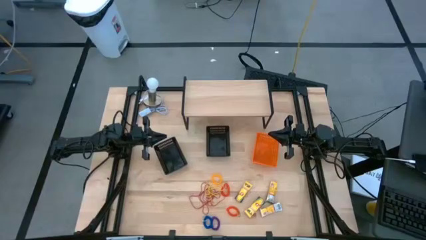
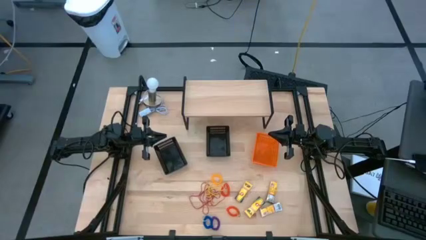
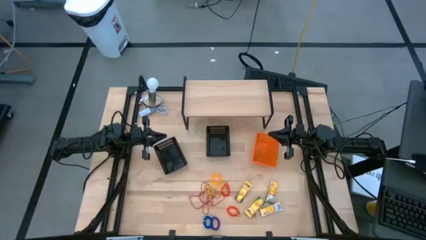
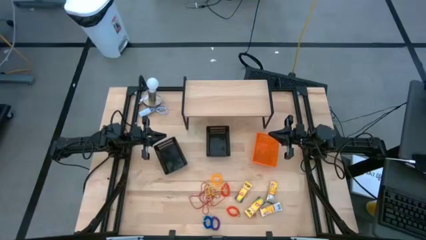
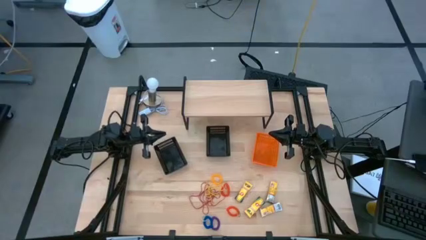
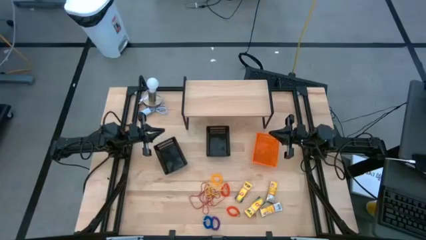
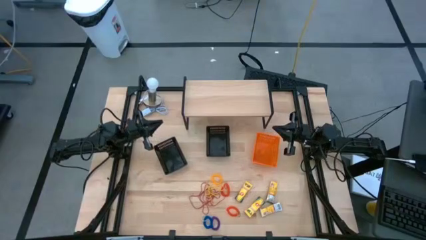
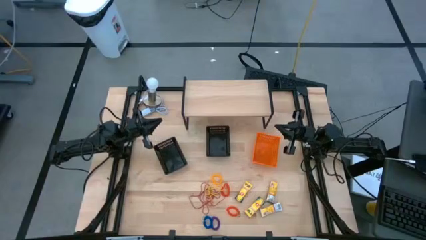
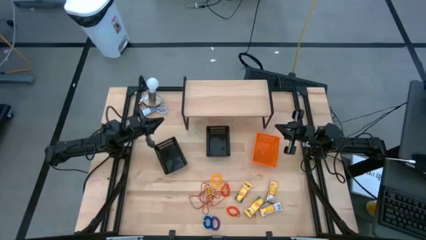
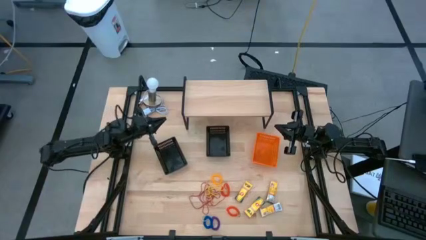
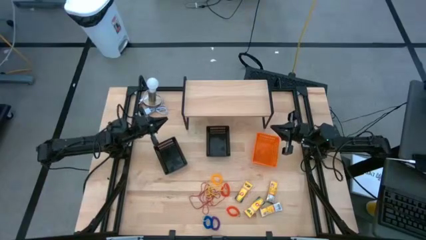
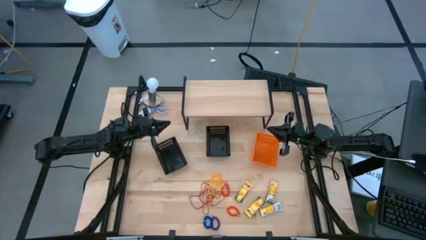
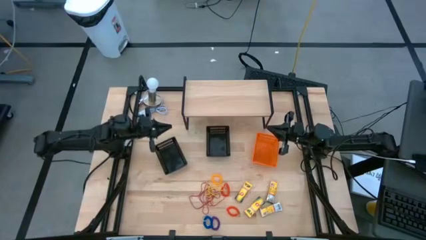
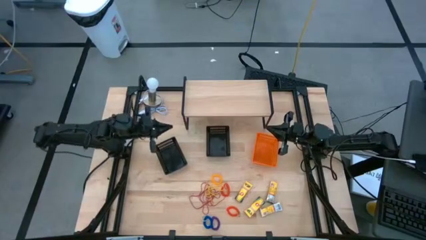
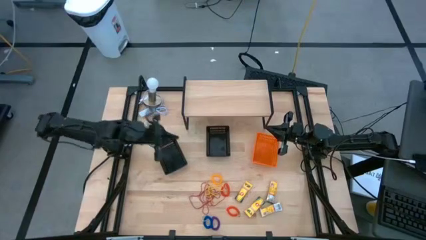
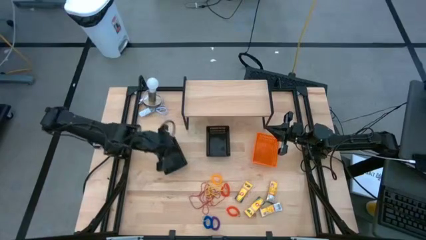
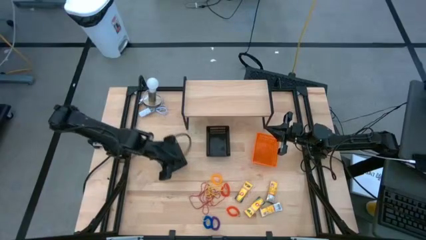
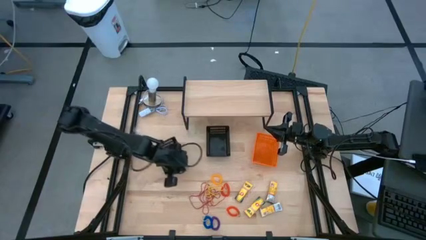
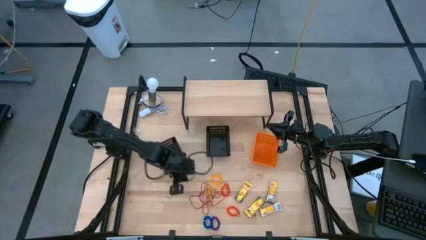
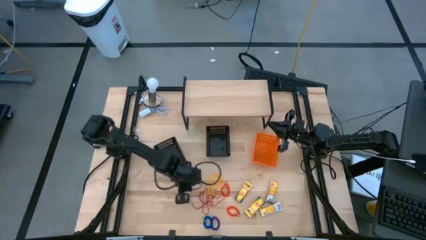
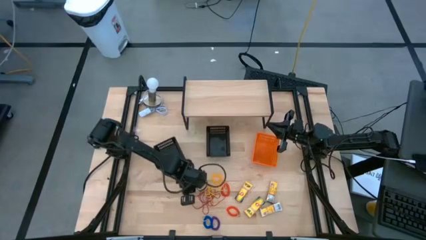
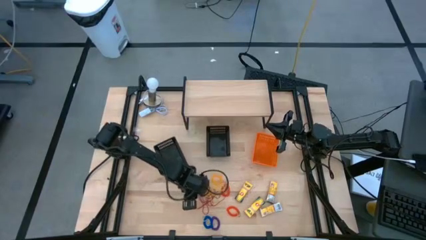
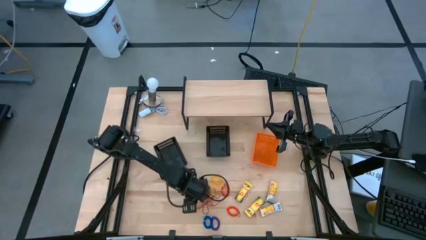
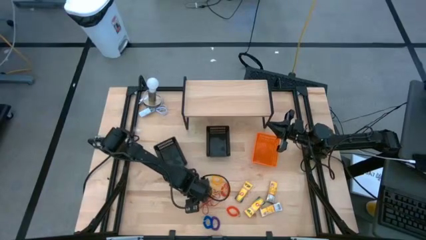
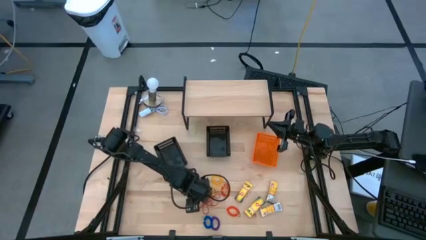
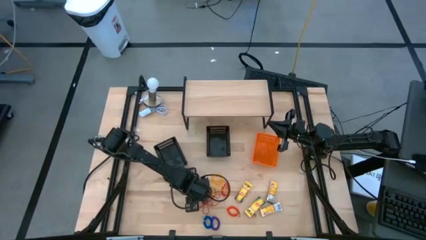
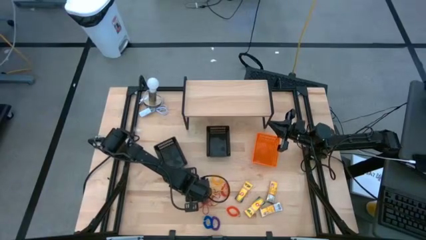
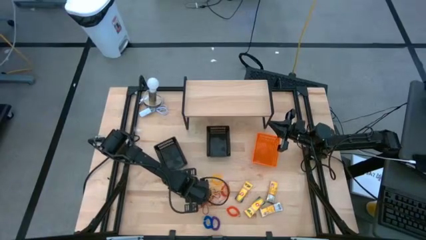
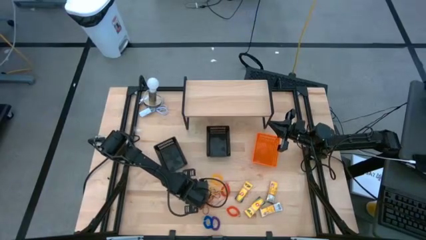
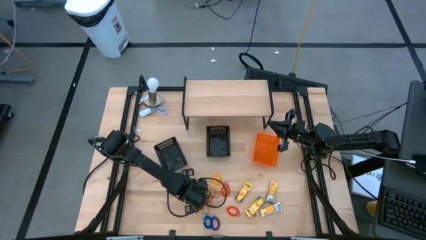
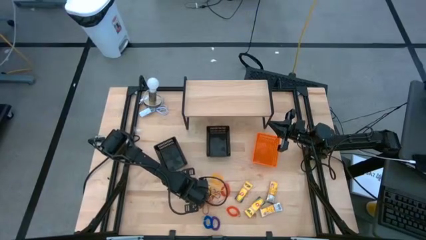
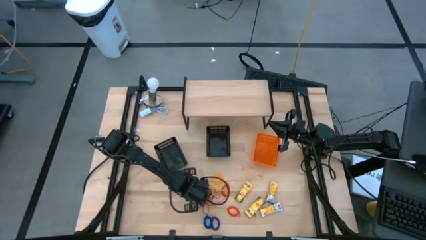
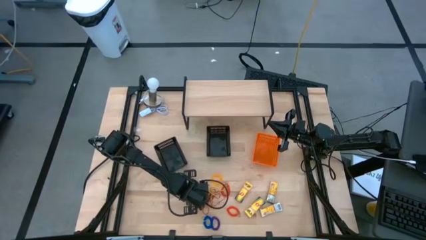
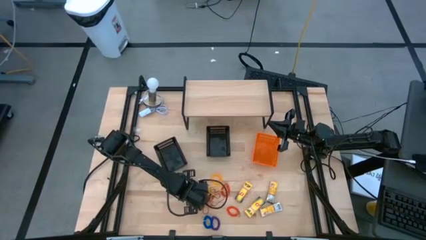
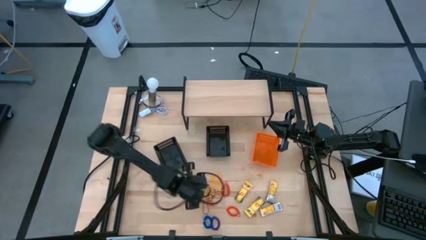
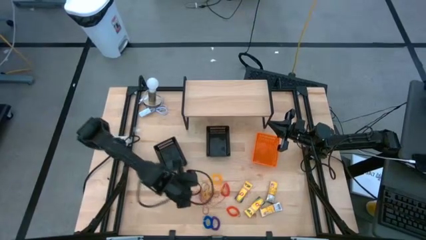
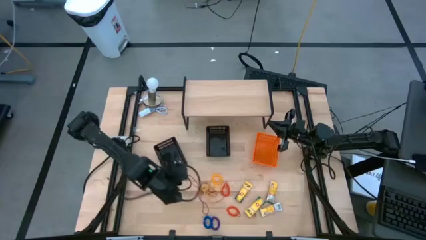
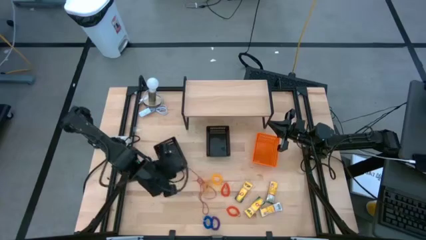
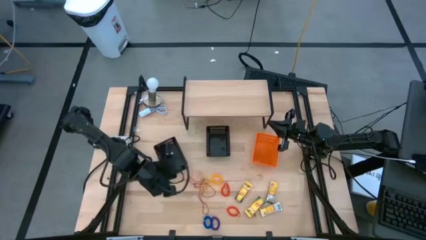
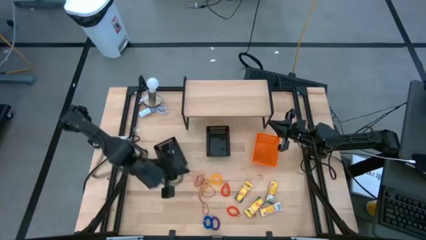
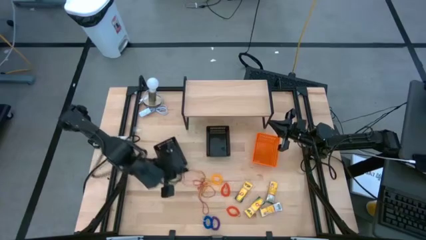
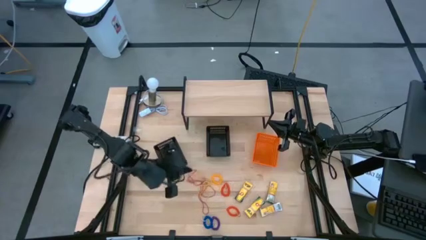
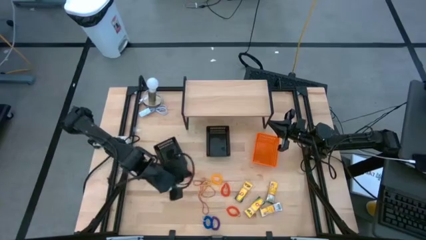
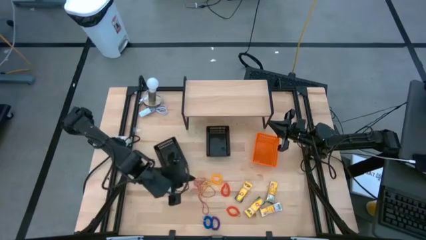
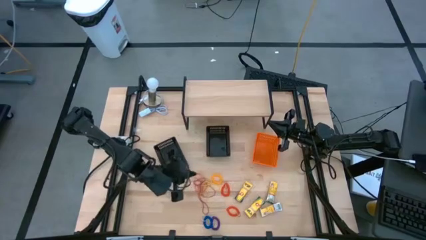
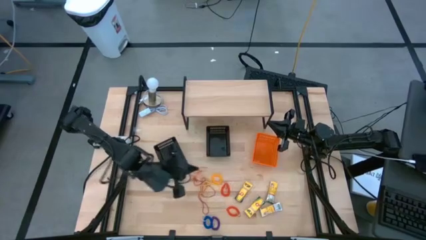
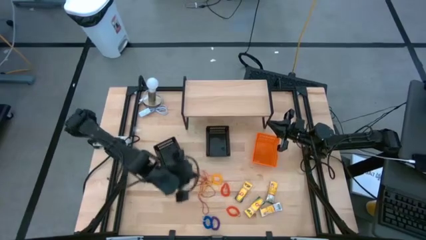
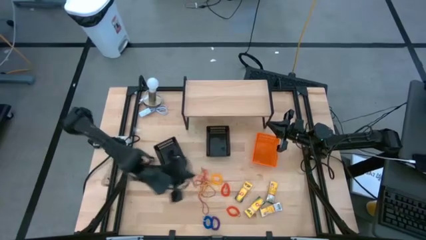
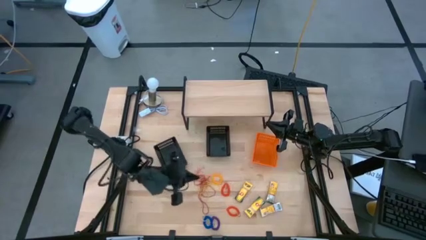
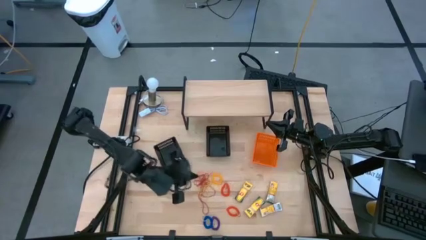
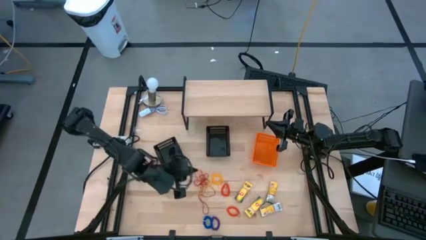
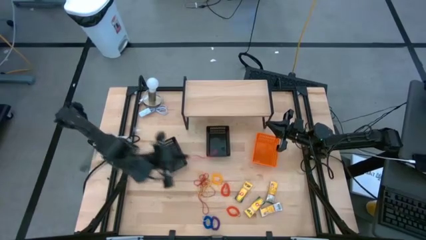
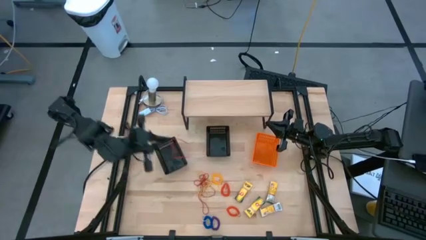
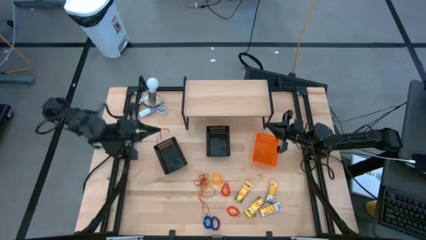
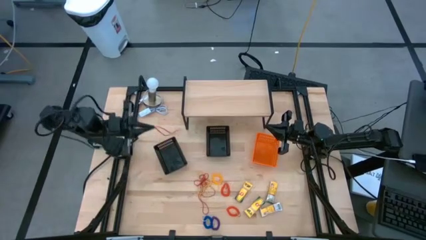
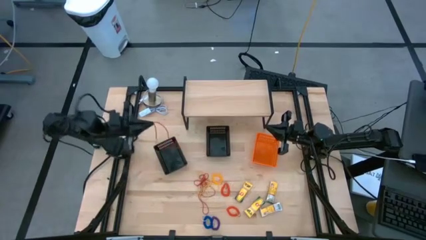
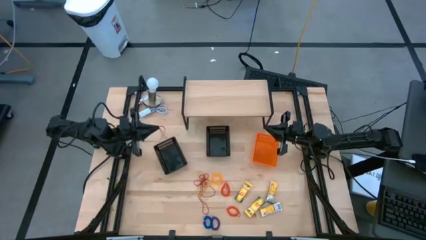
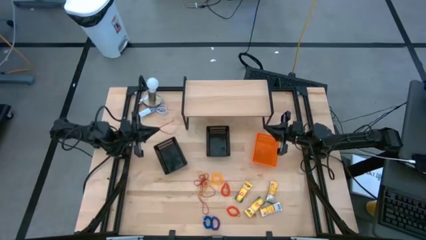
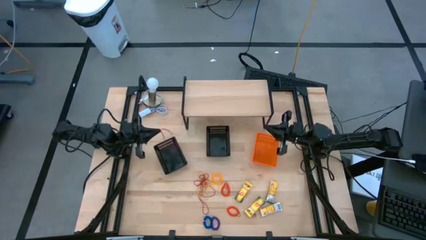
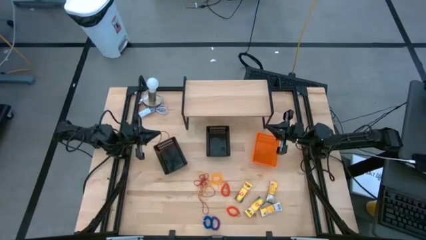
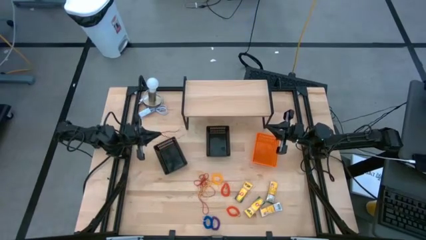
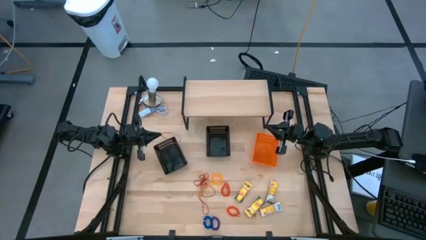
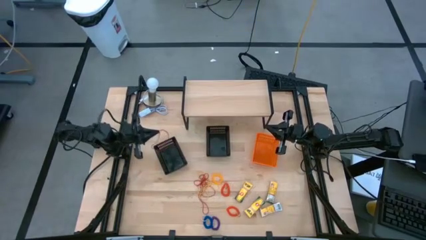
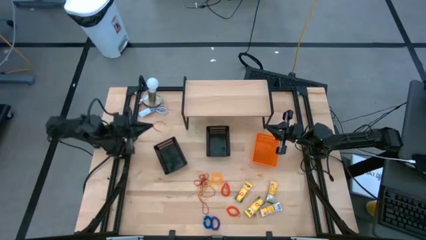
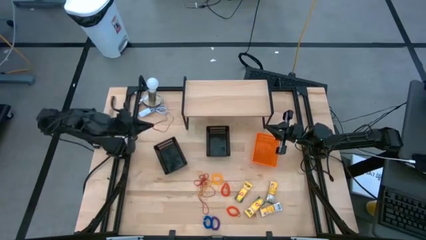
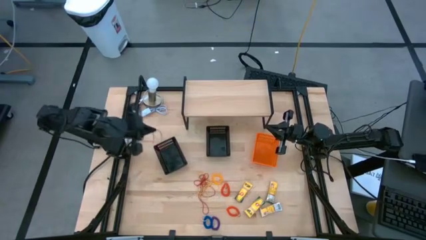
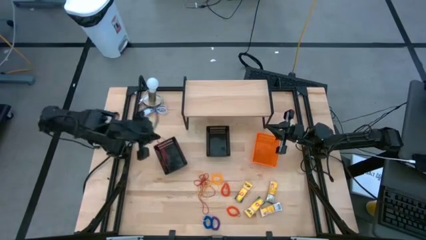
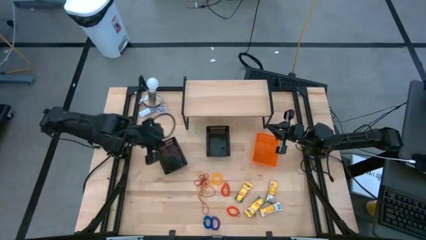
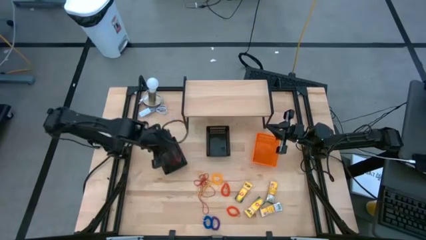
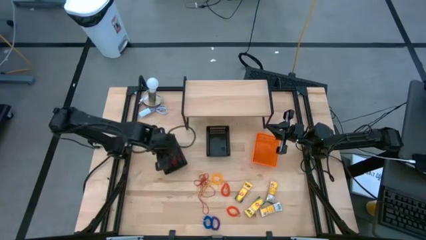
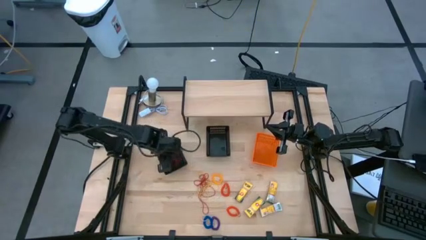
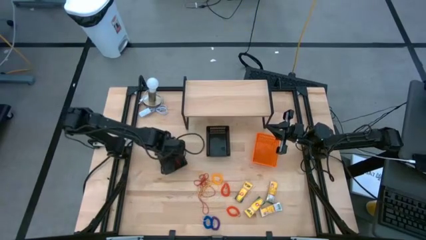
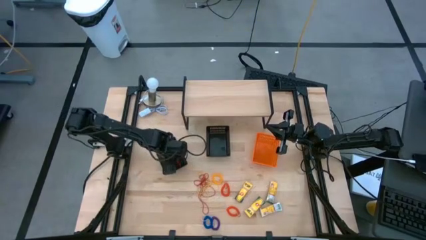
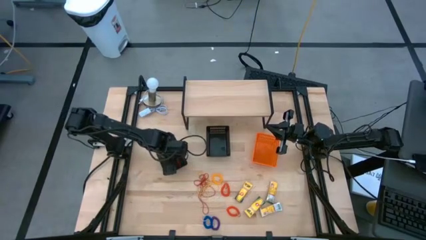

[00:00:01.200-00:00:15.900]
Task: Pick & Place Office Desk Supplies
Put the red rubber band into the left black basket
